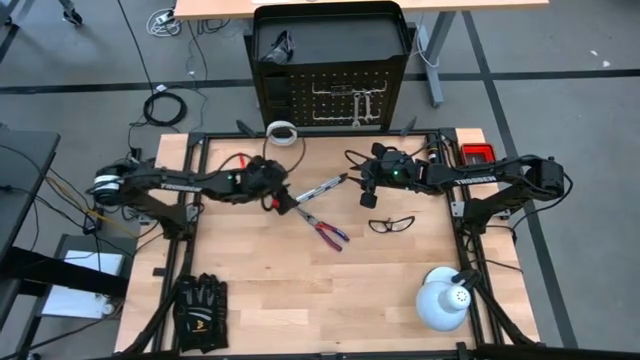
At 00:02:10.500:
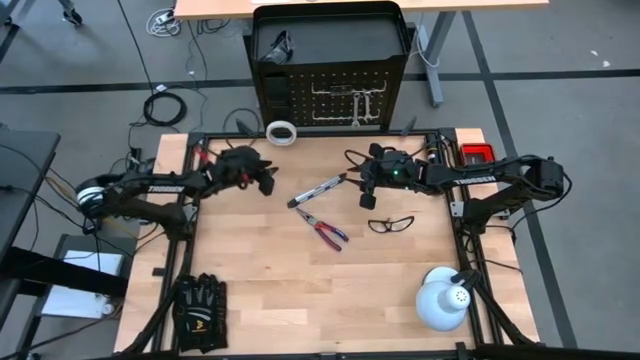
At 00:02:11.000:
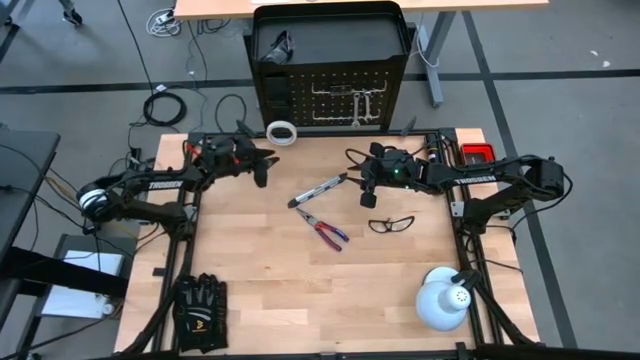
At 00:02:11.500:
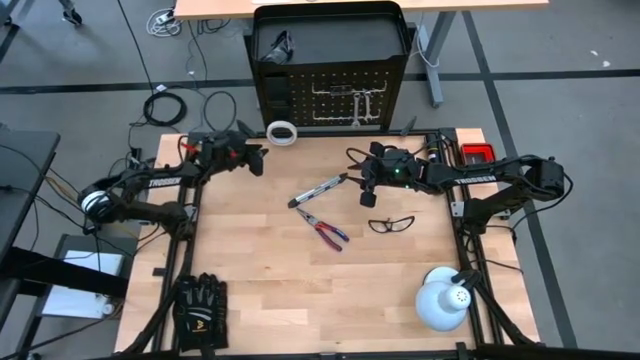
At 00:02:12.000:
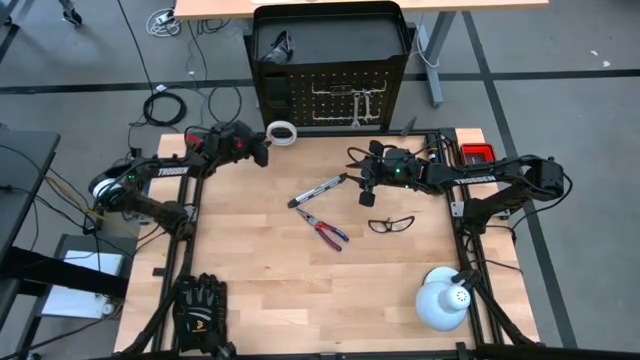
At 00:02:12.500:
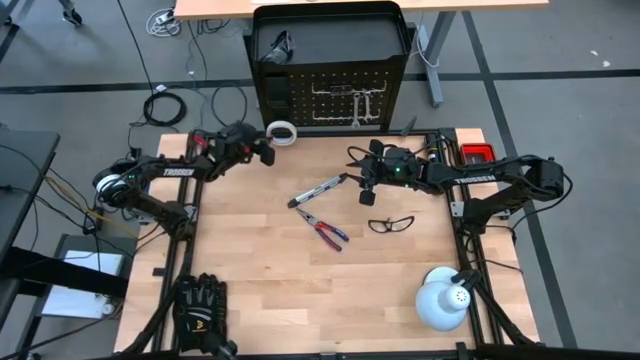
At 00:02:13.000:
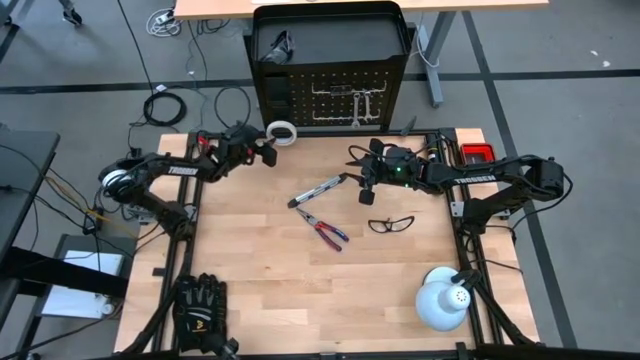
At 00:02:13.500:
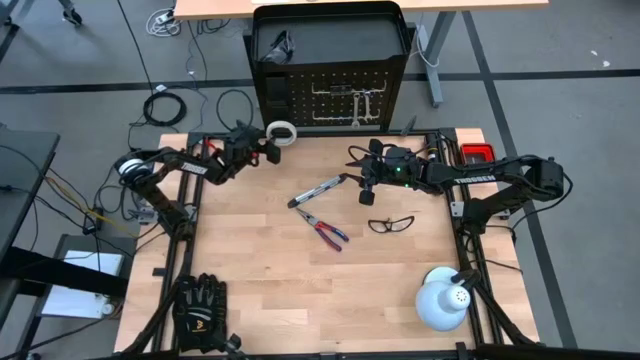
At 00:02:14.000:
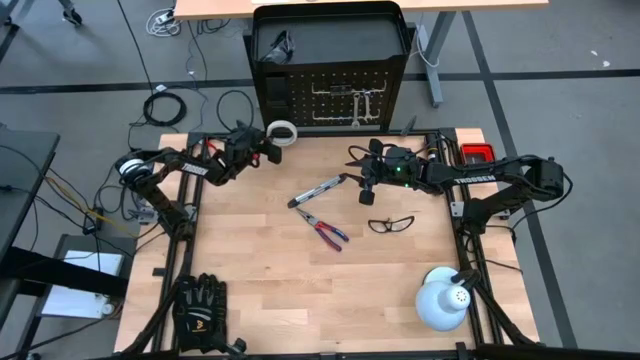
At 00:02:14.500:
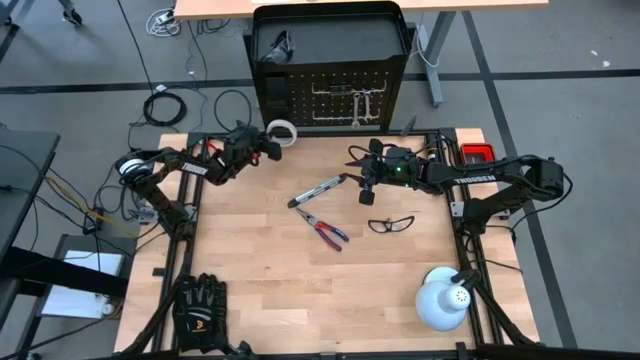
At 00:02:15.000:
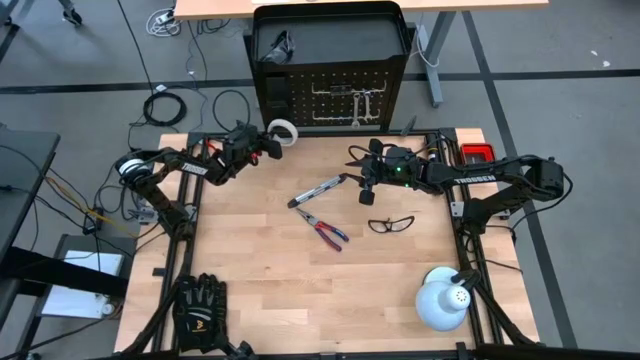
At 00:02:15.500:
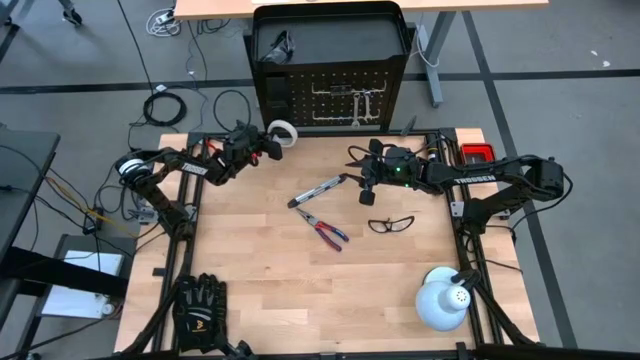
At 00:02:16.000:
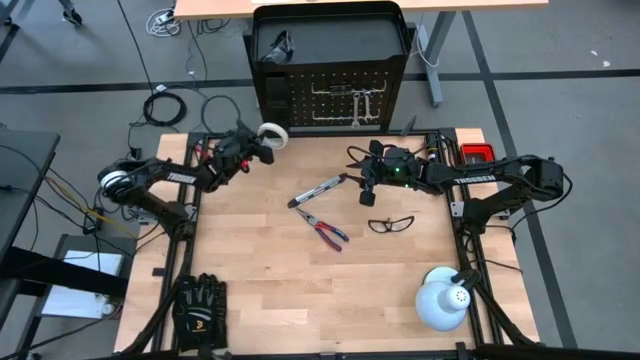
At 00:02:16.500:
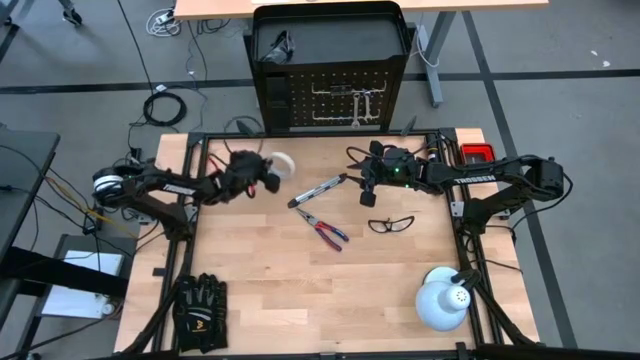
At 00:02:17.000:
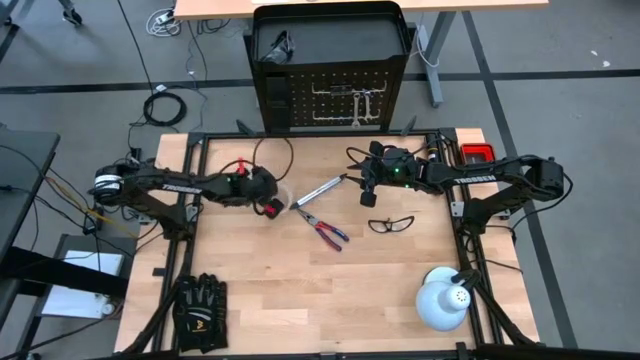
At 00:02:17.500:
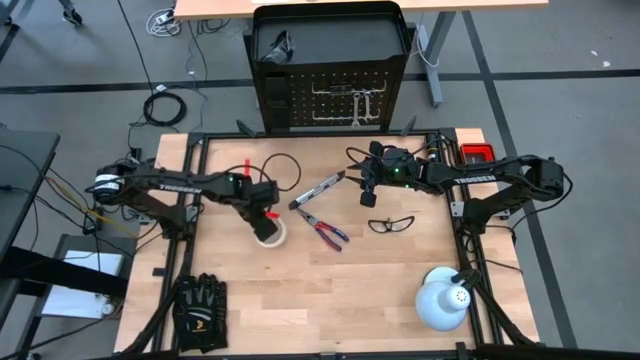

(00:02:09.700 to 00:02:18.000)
Task: Hang tools onto peg board
Unhang the white tape from the peg board

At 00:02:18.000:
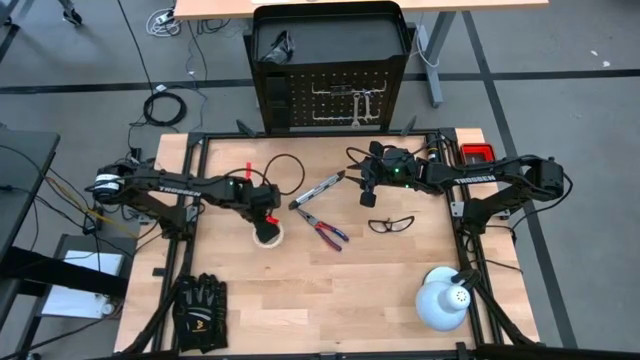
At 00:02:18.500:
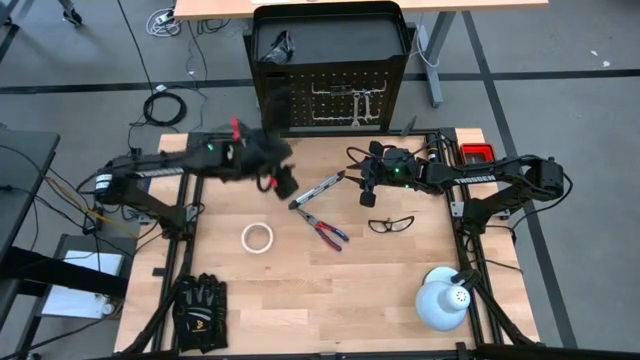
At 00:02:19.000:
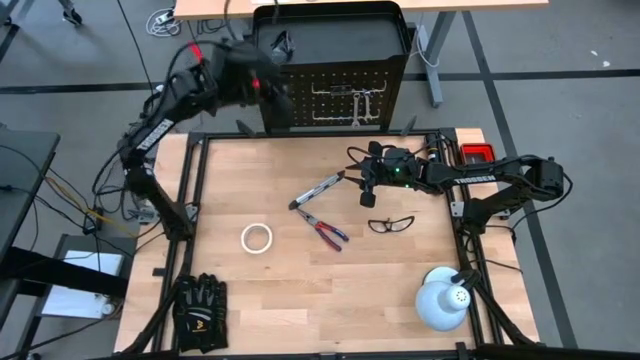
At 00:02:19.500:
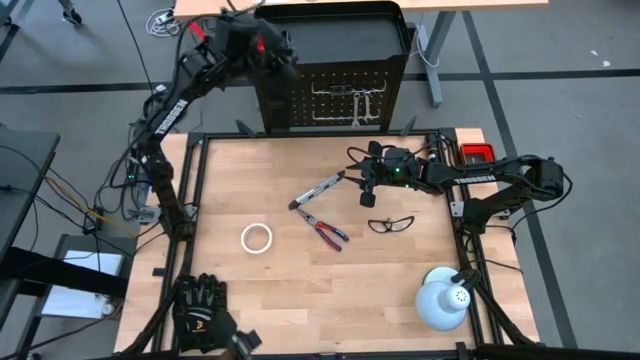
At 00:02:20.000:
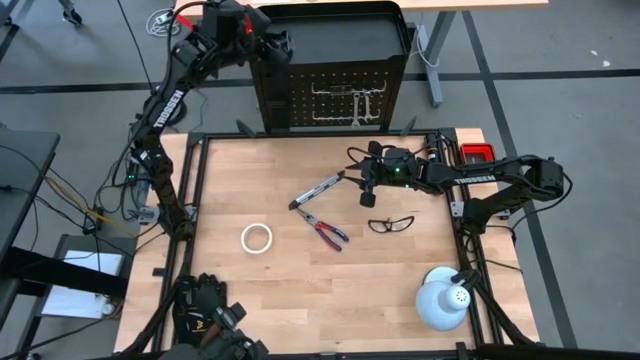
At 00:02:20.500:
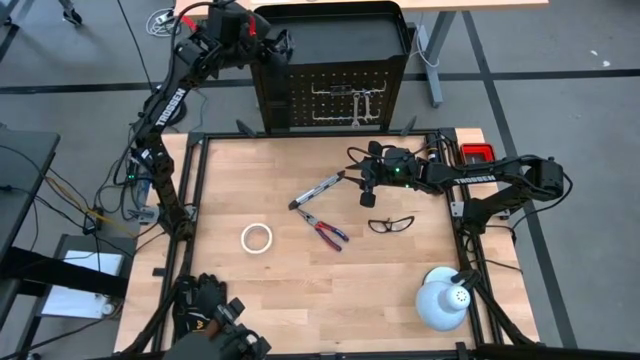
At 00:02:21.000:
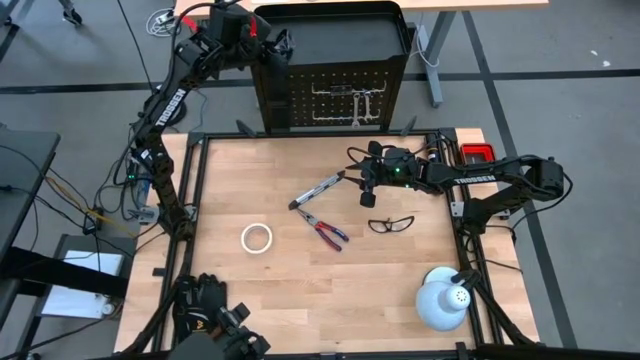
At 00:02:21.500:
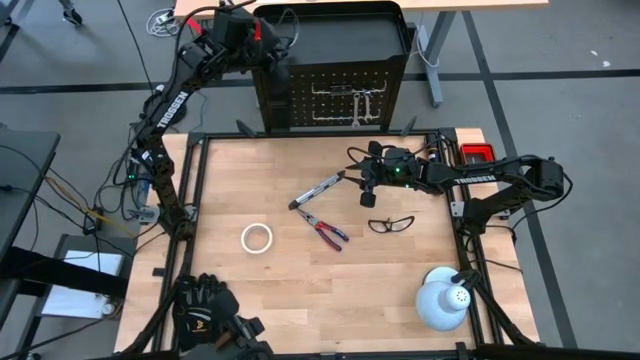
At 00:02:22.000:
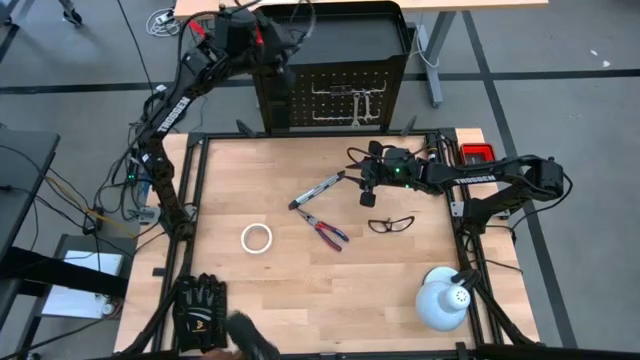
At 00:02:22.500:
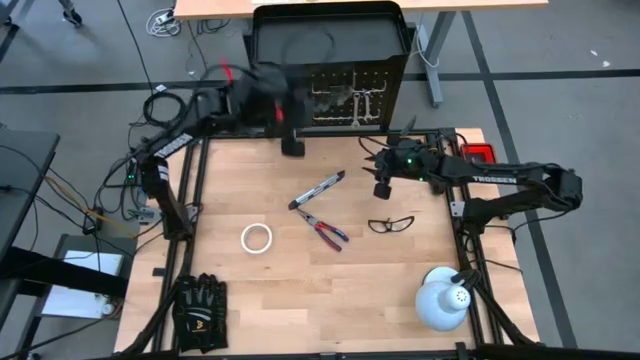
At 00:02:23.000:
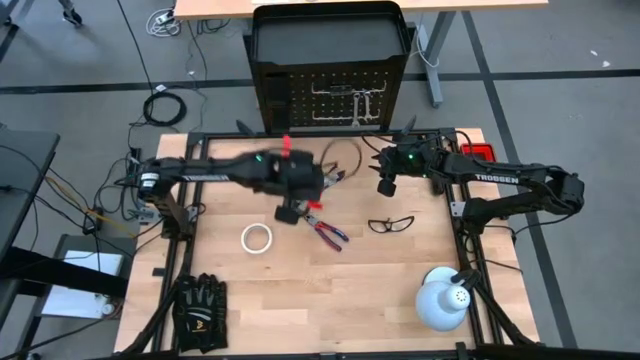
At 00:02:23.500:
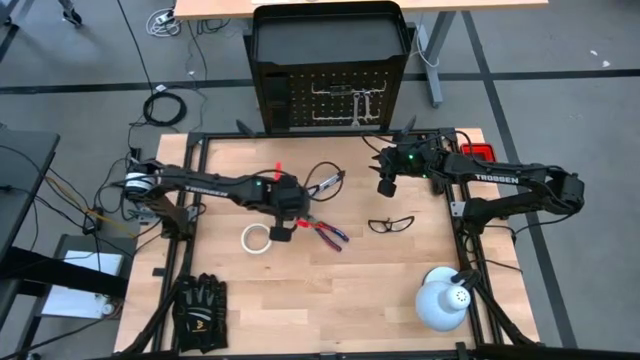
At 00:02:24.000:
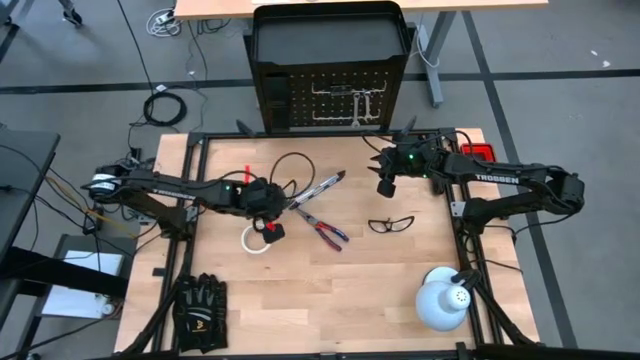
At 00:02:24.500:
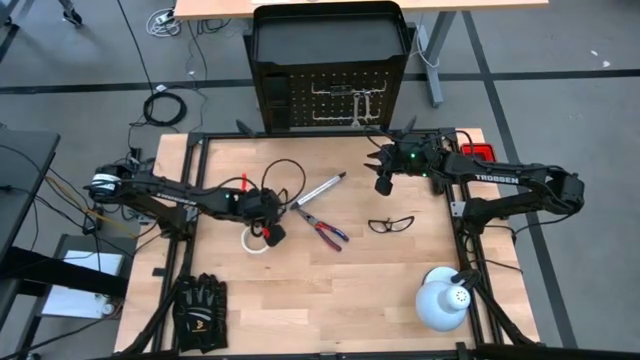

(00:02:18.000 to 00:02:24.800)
Remove the black safety glass from the peg board

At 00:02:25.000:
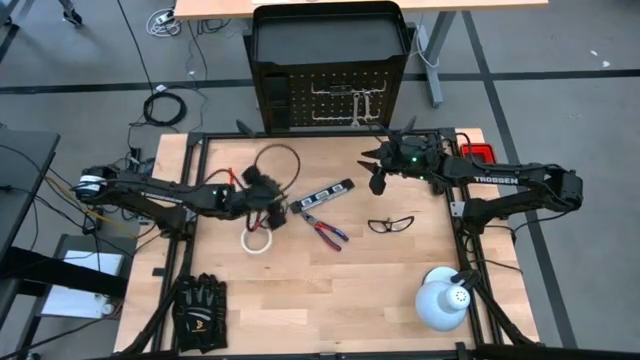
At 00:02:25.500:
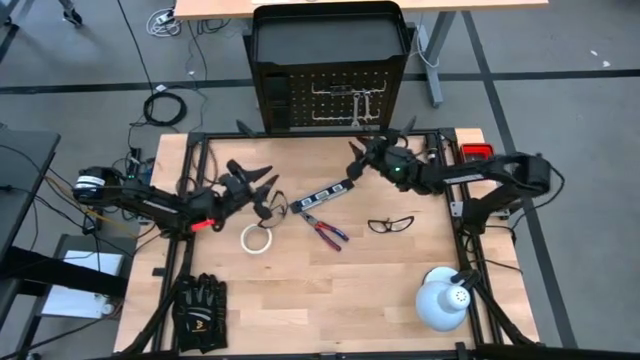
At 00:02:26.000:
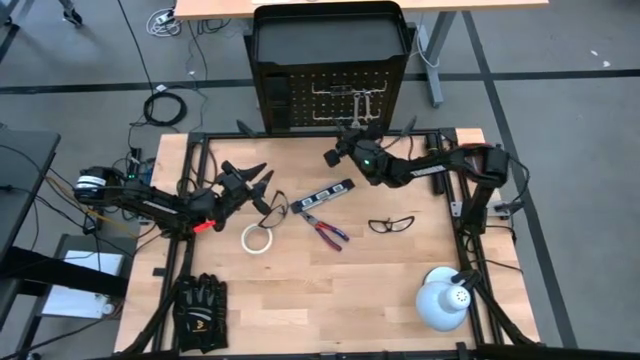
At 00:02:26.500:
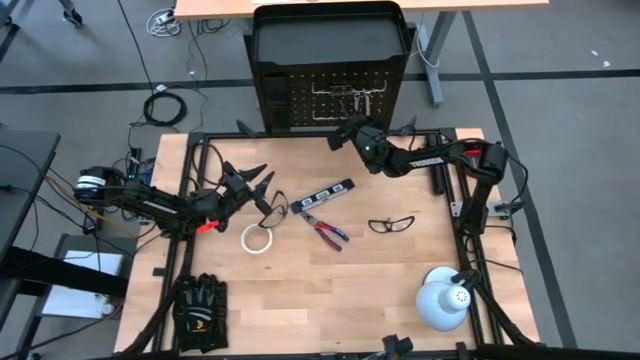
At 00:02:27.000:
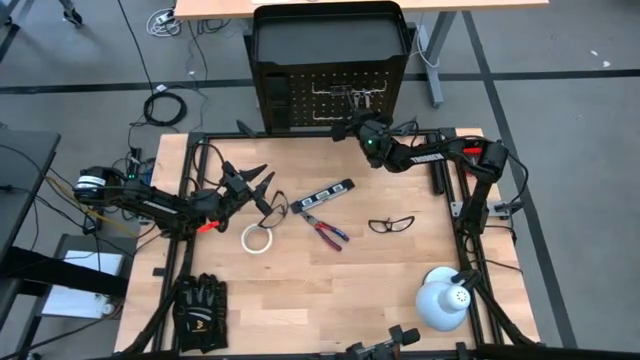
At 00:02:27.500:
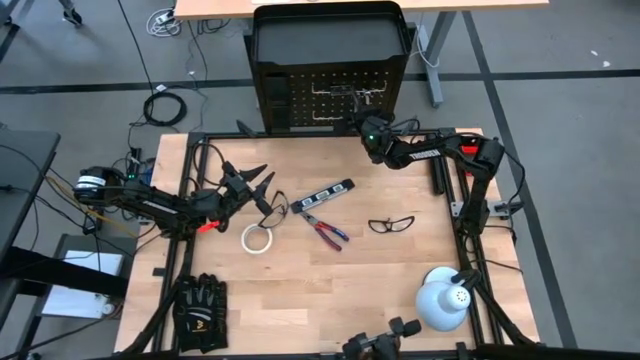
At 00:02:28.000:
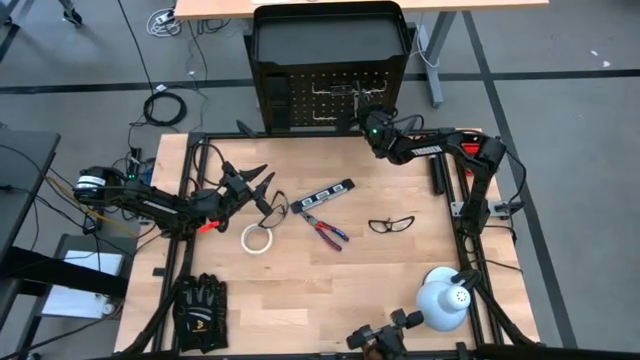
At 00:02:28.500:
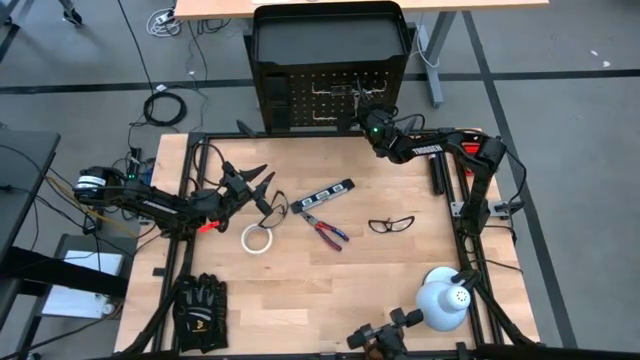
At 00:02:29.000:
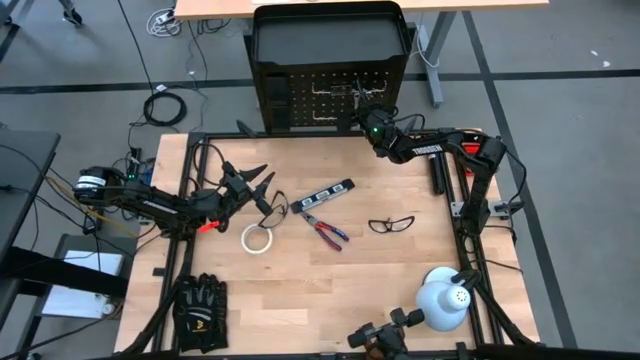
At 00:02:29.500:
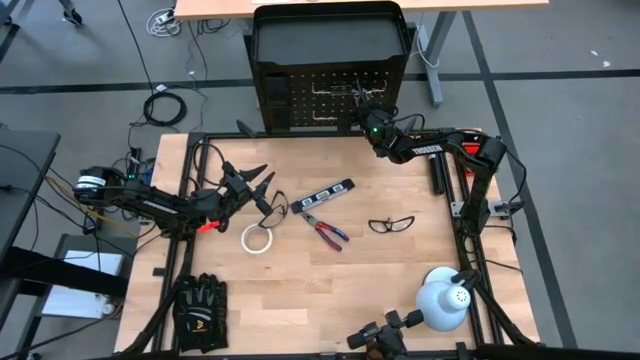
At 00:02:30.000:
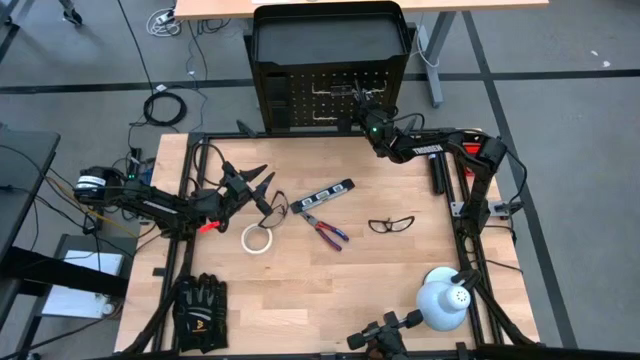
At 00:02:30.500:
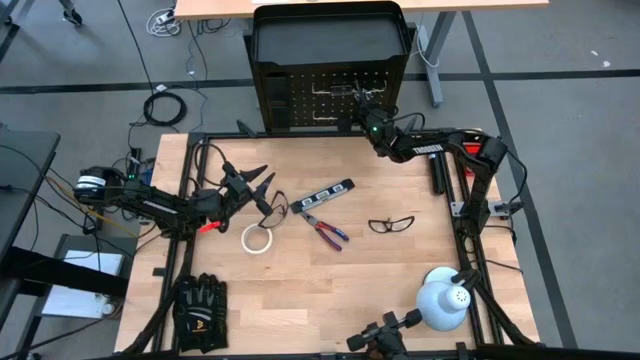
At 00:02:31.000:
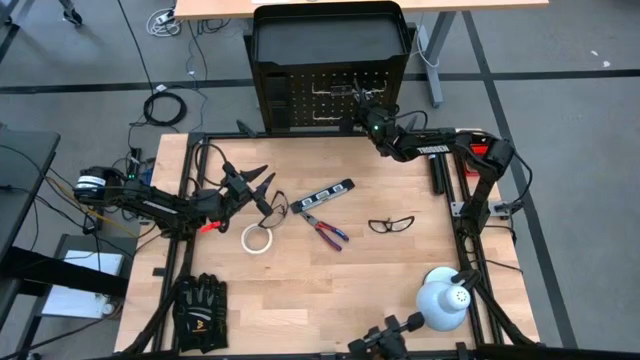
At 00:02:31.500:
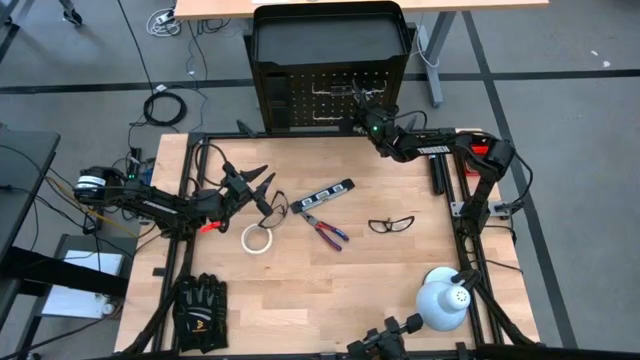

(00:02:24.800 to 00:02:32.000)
Unhang the left silver wrench from the peg board
